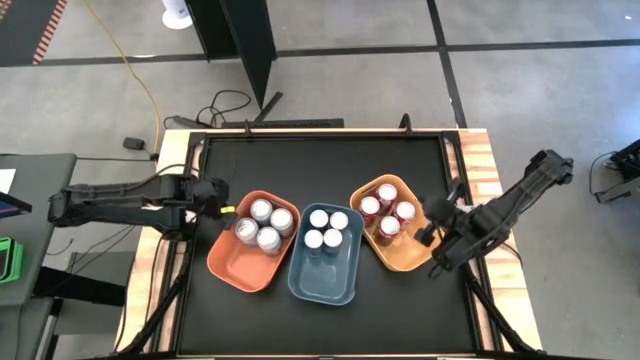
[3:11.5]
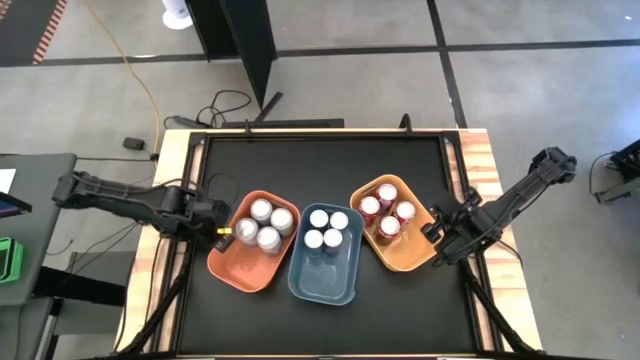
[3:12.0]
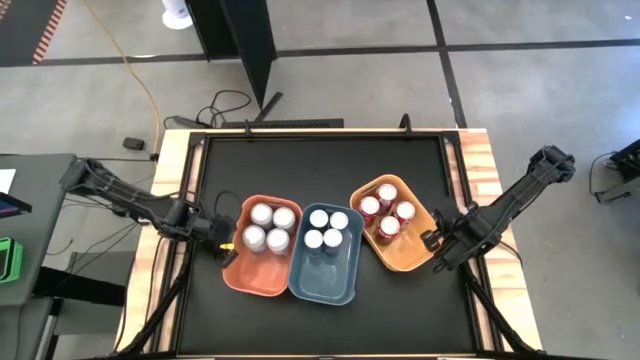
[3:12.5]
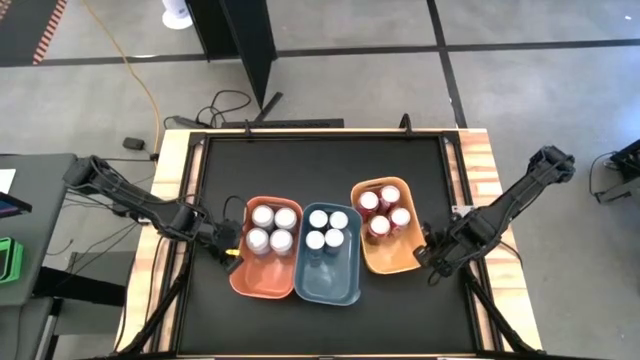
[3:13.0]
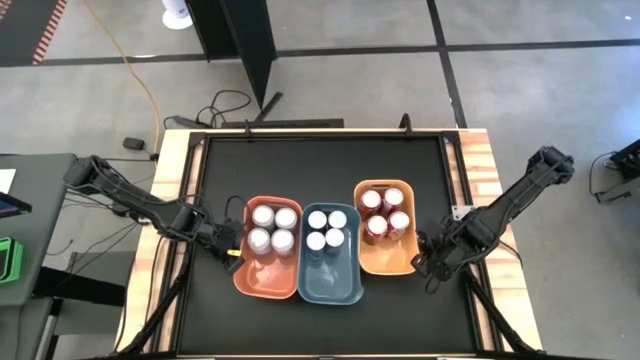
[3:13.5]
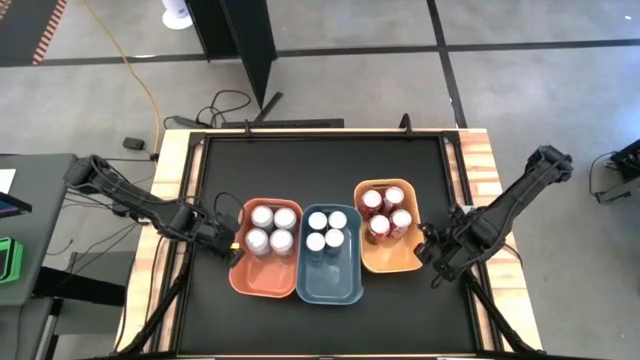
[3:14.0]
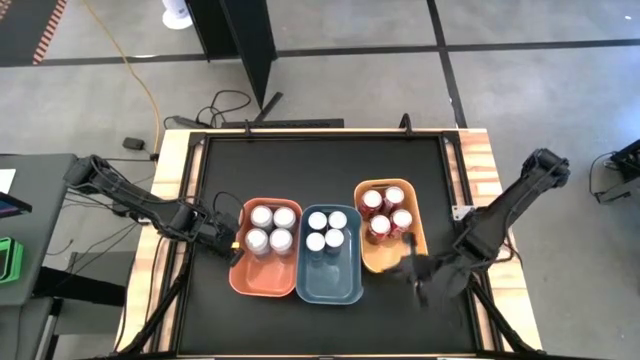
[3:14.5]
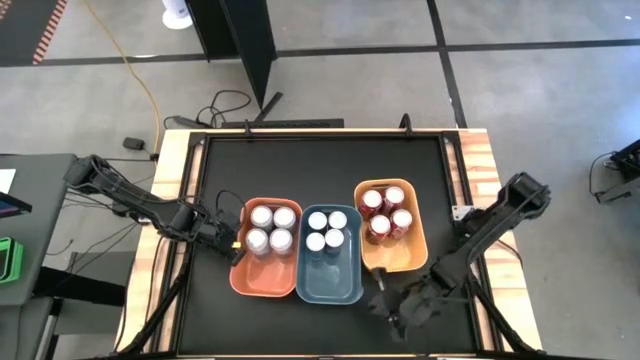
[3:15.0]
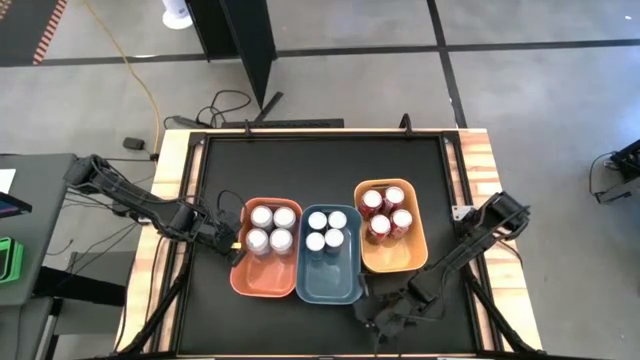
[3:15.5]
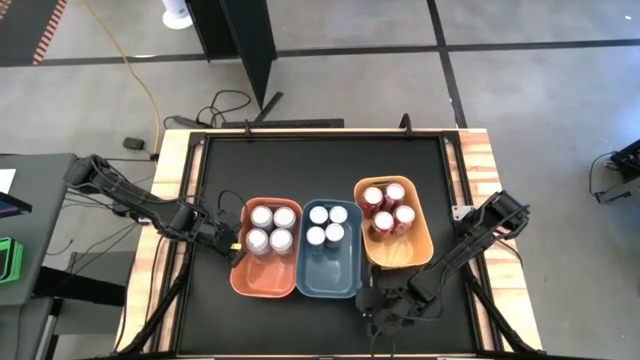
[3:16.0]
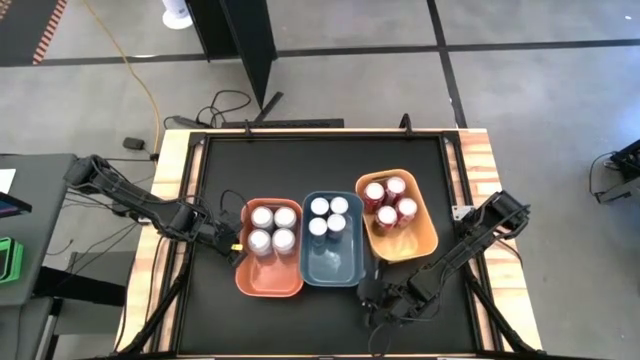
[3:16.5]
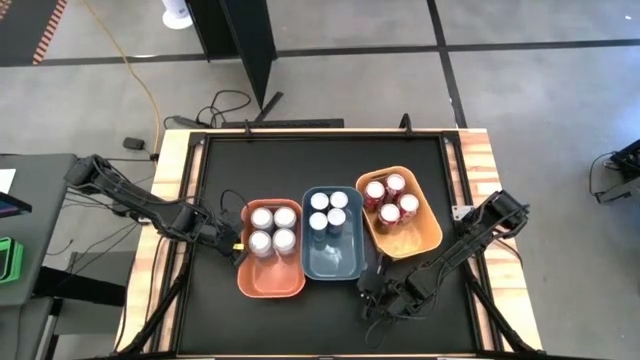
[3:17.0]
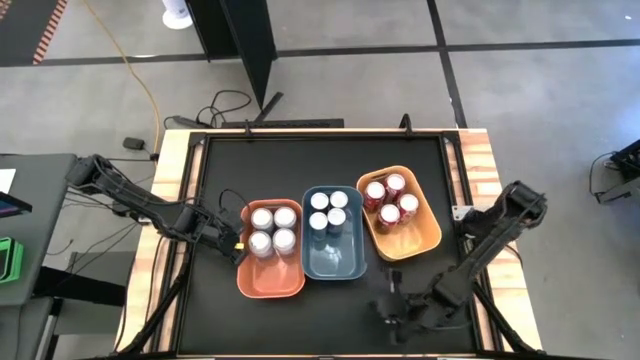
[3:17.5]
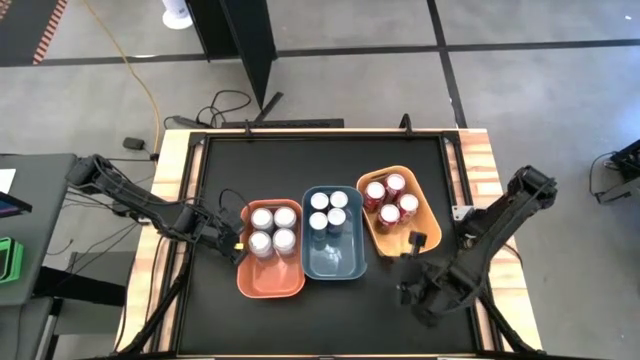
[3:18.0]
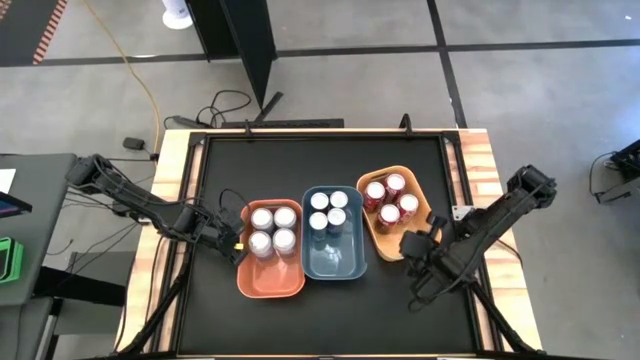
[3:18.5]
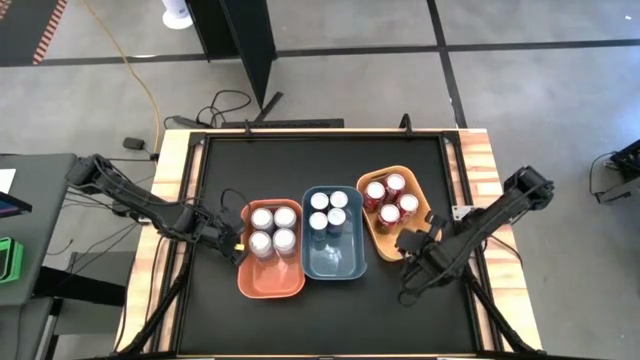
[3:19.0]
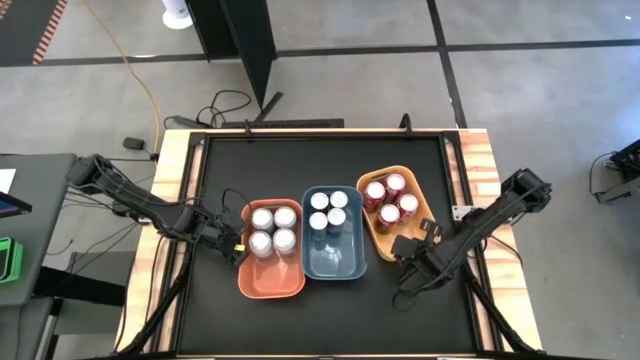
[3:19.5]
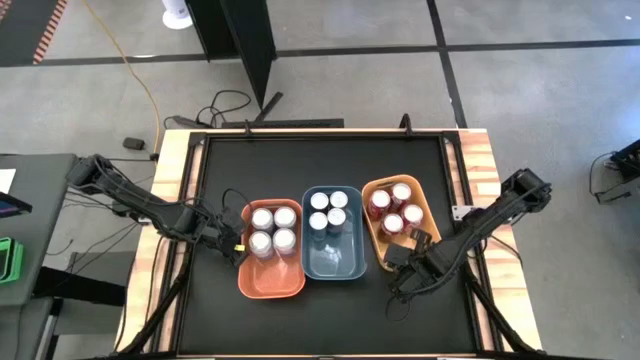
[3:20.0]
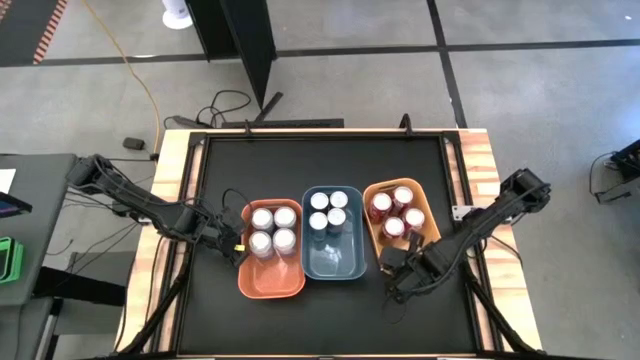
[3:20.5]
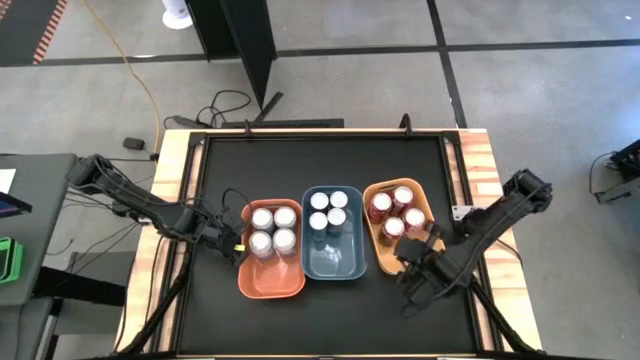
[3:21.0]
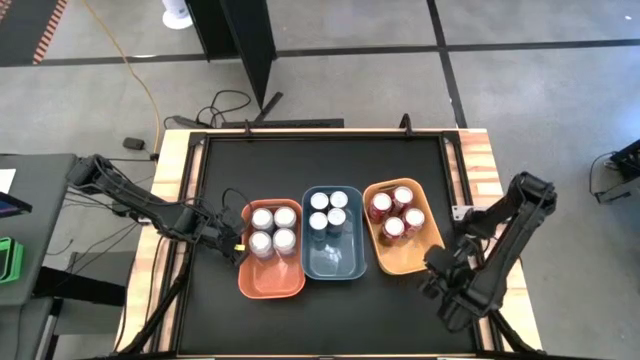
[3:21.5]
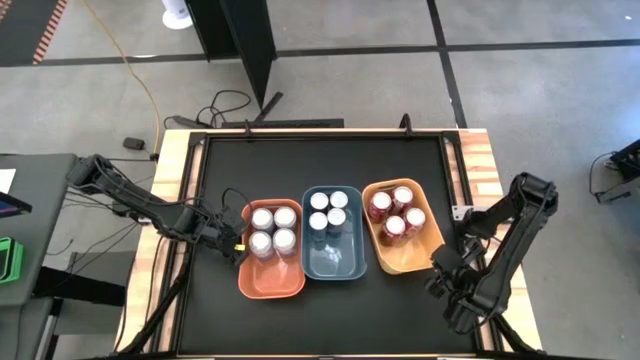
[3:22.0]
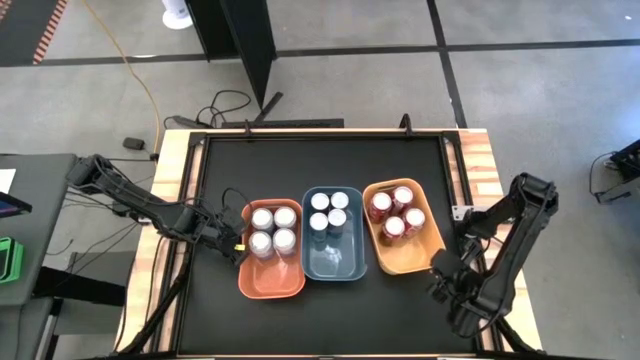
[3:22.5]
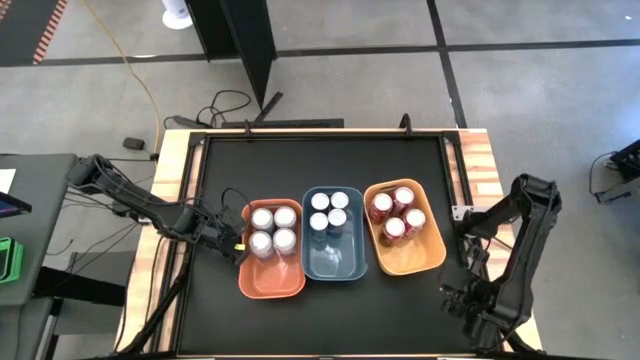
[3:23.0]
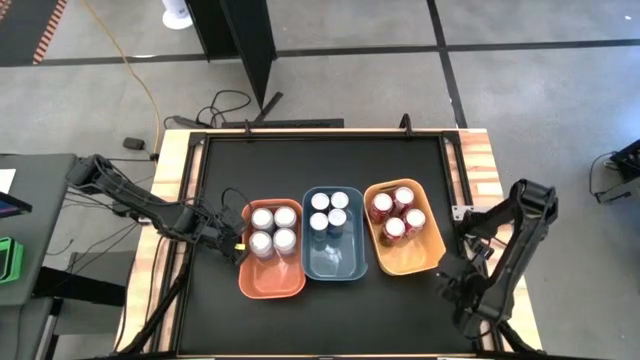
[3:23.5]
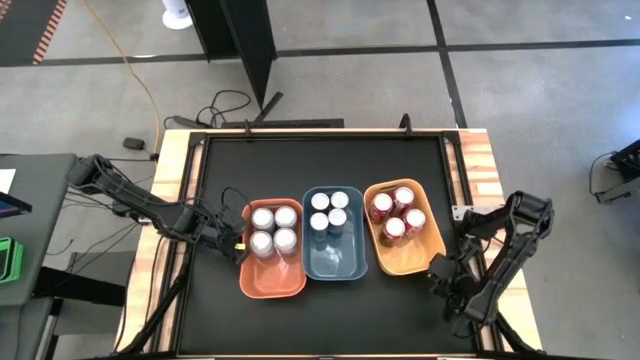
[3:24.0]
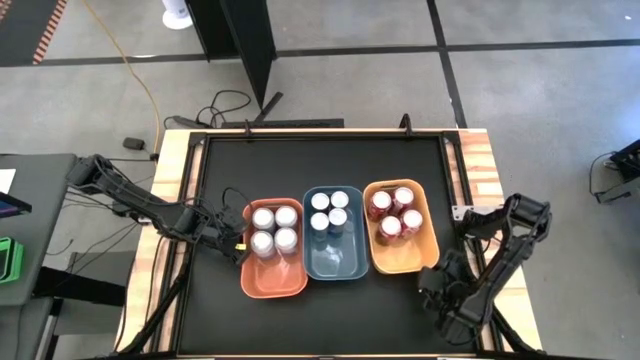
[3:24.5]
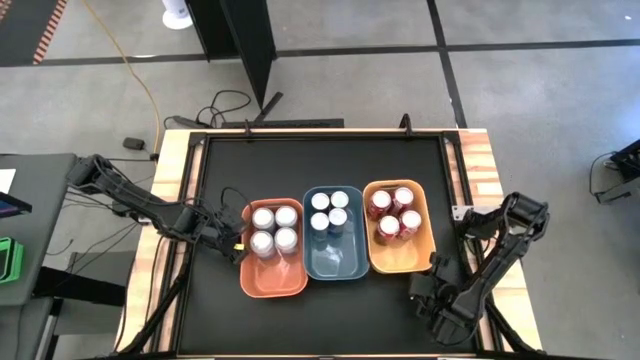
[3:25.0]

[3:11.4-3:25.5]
Task: Sort soda cans
Adjust the bins to the center of the table

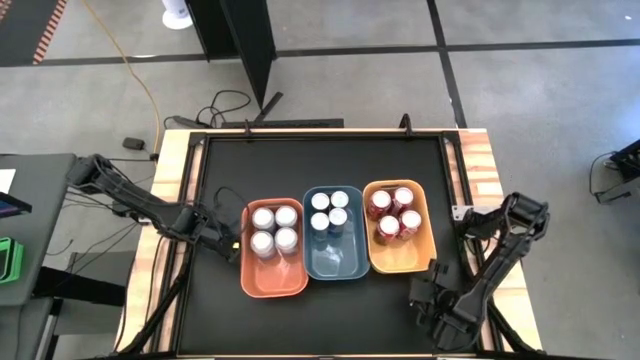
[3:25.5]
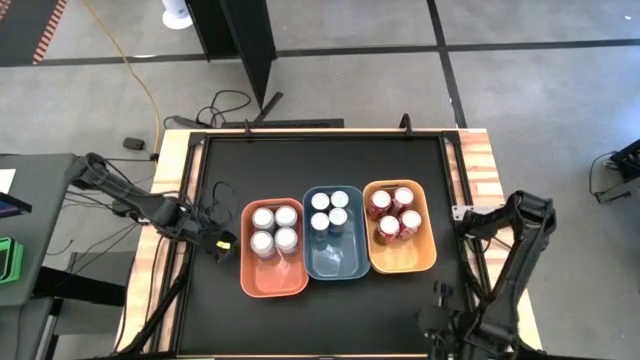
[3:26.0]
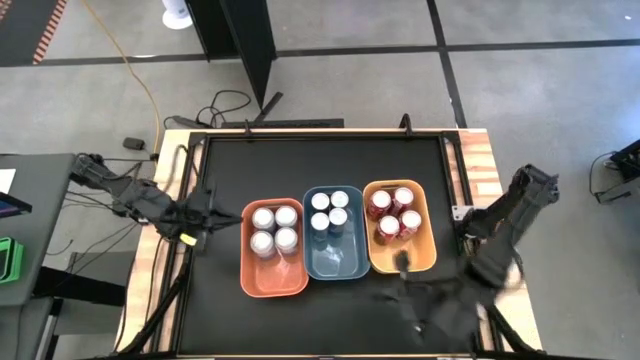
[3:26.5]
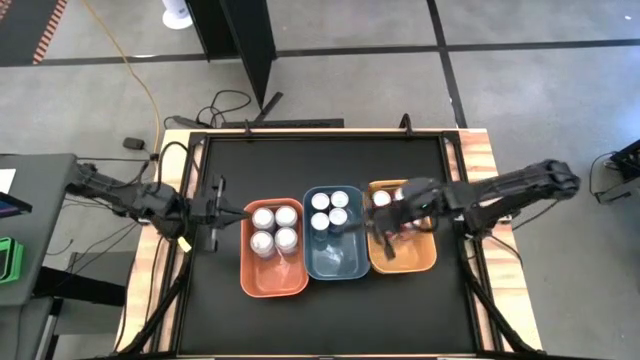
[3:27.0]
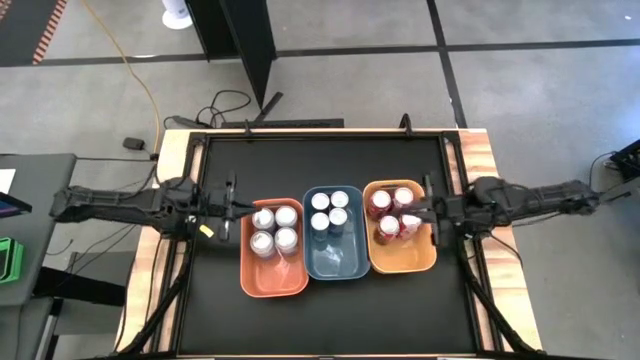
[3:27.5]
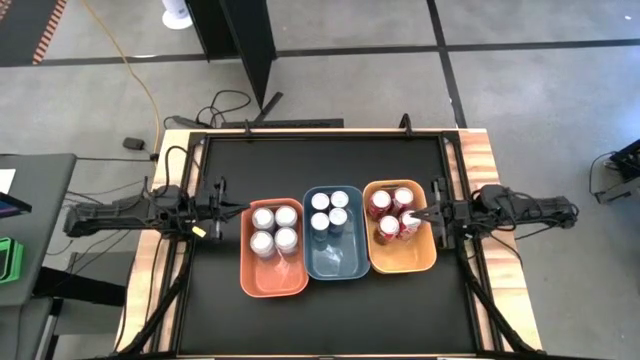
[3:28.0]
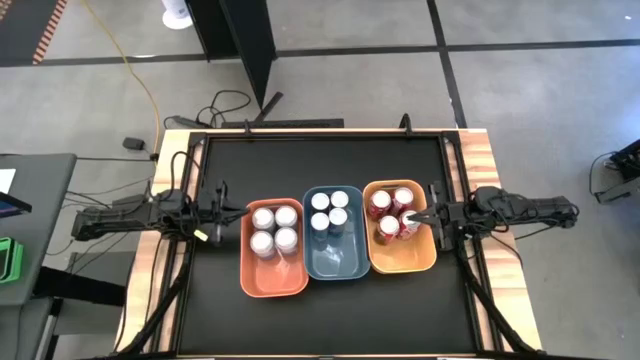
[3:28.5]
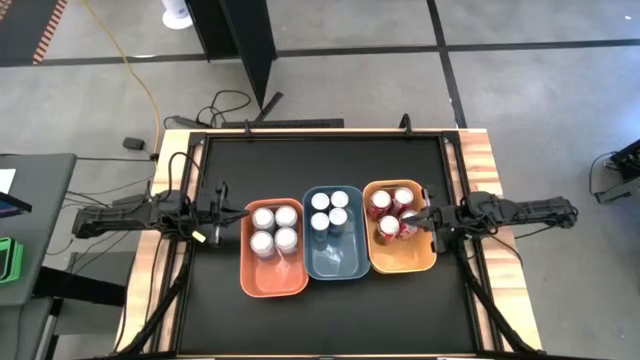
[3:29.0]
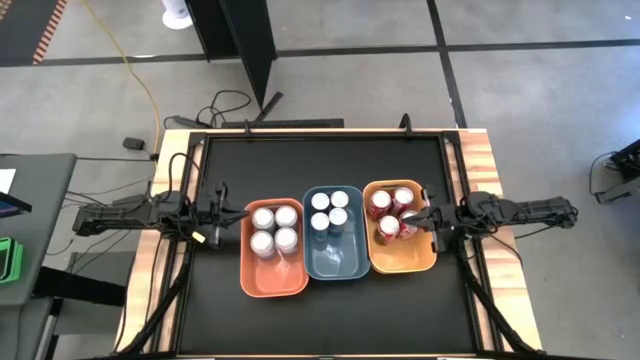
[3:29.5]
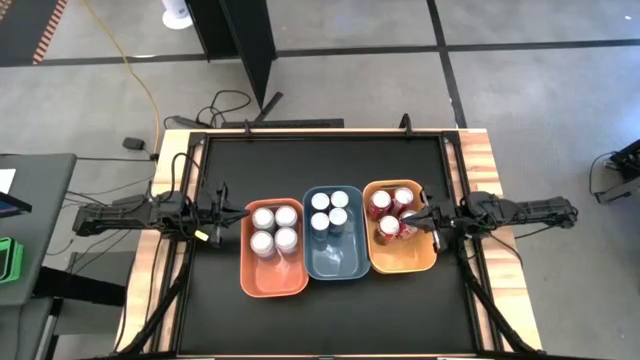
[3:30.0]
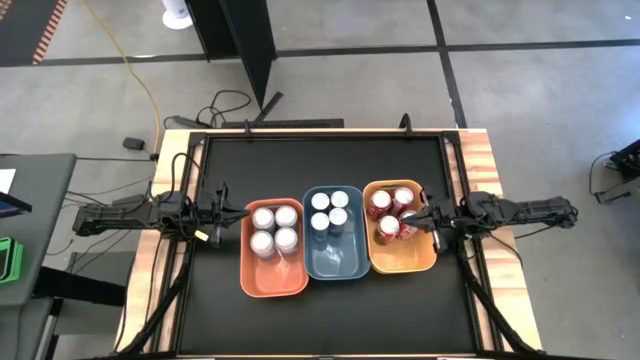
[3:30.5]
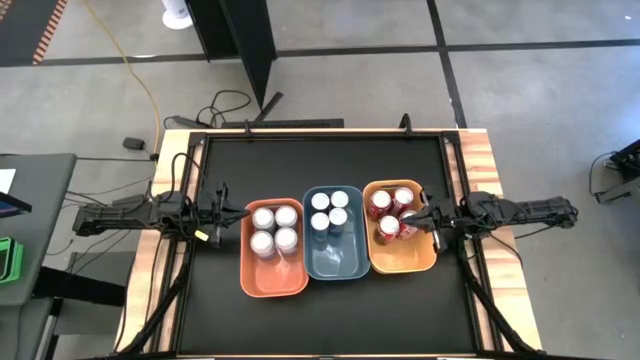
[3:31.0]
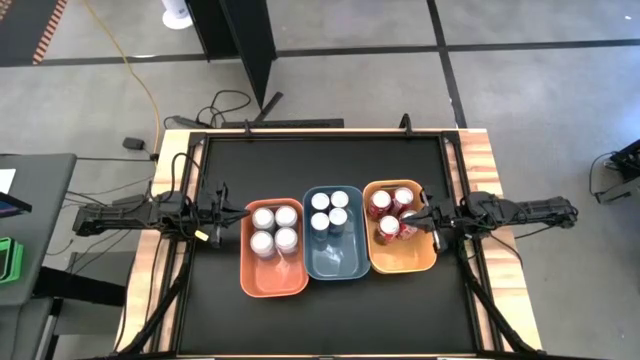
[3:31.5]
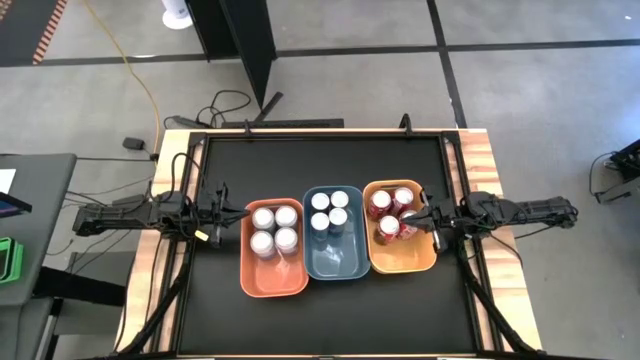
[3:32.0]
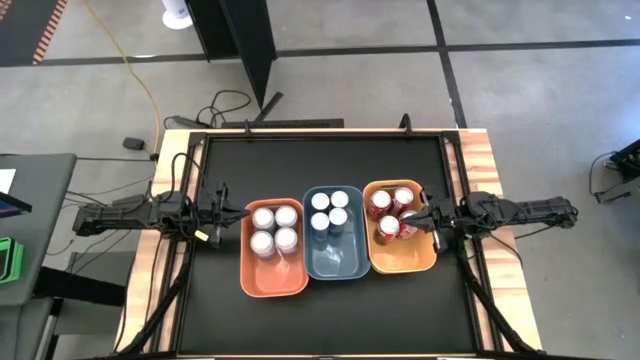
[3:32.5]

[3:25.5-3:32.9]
Return to Home Position

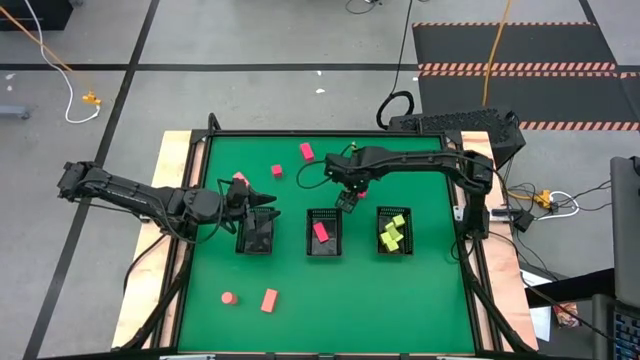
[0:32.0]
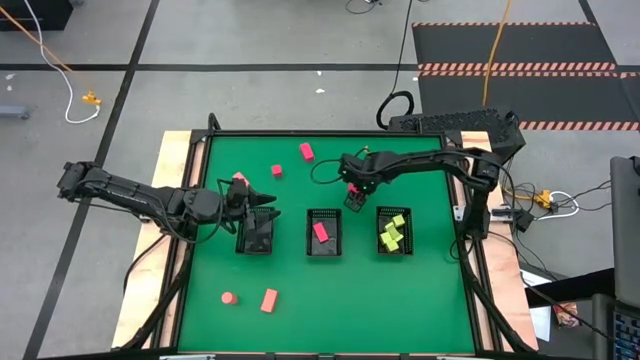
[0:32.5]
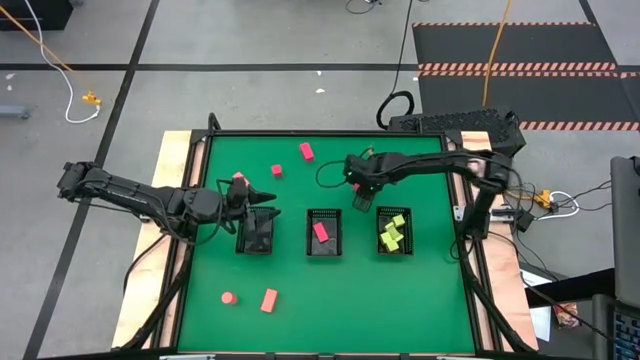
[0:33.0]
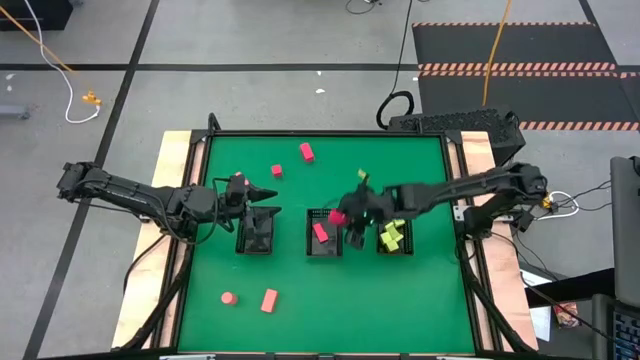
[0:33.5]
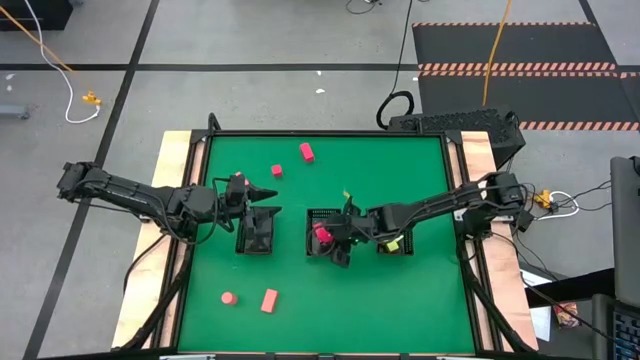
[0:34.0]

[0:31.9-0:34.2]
Task: Sort & place blocks by color
Put the red block into the middle black basket
